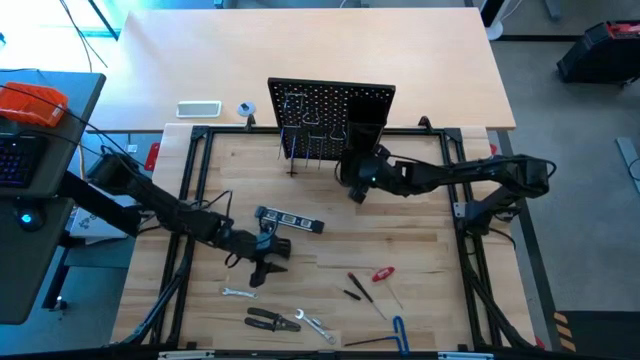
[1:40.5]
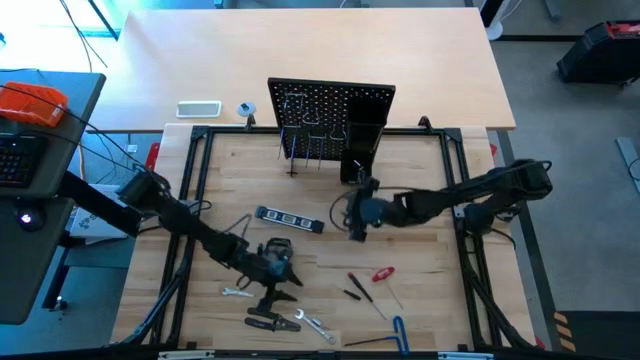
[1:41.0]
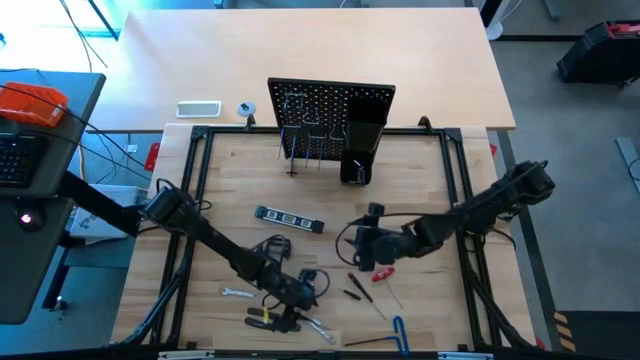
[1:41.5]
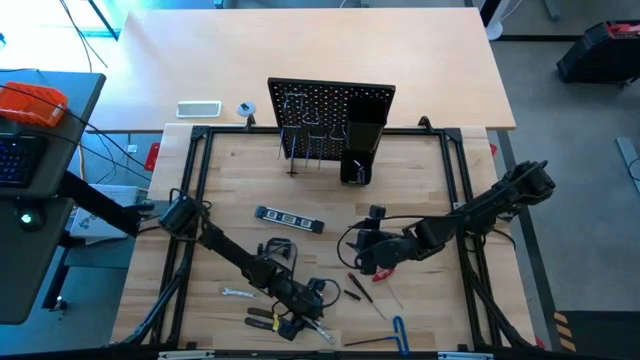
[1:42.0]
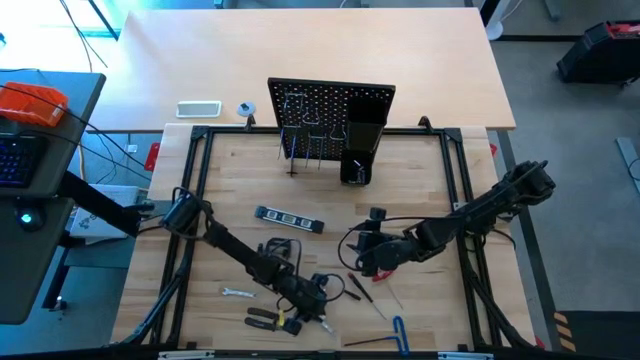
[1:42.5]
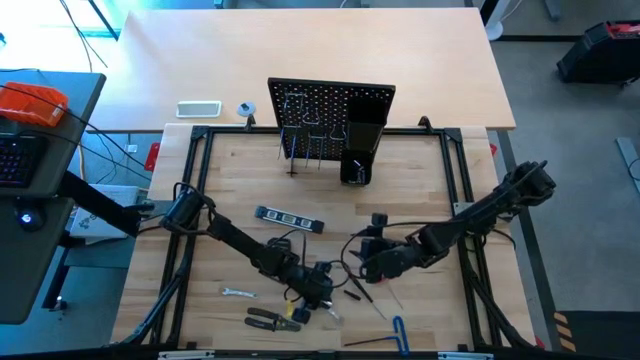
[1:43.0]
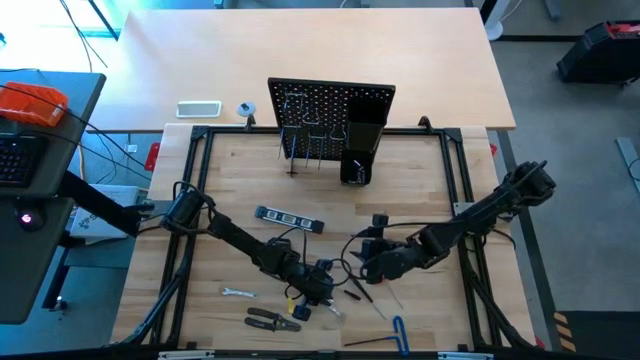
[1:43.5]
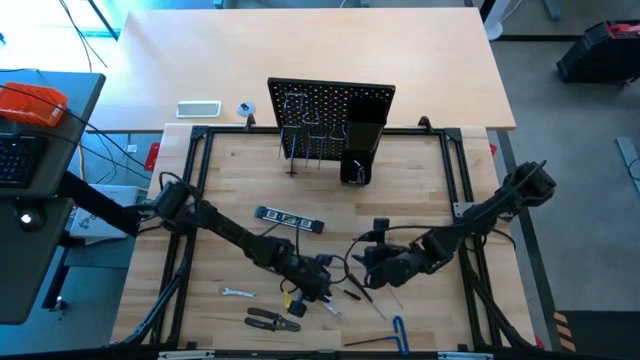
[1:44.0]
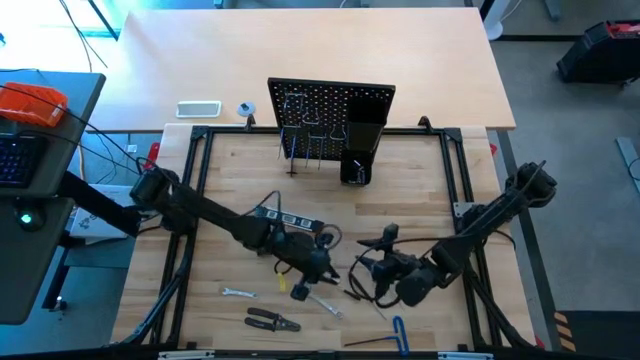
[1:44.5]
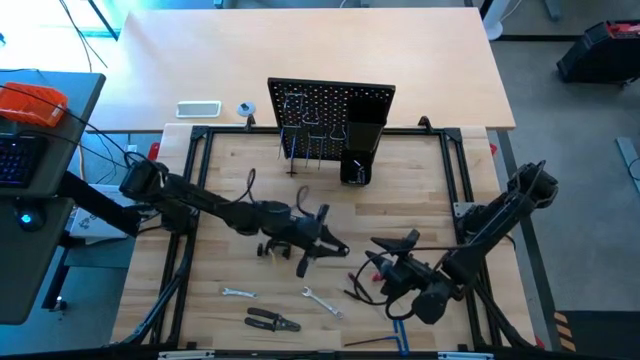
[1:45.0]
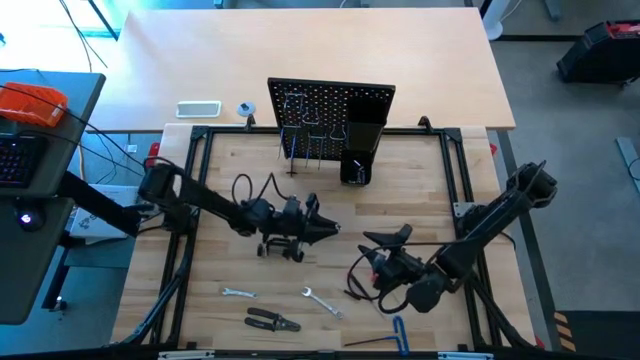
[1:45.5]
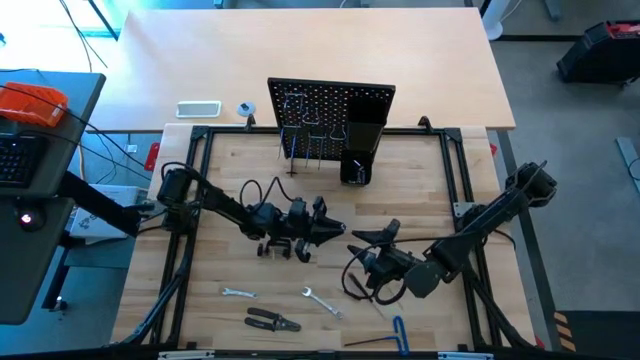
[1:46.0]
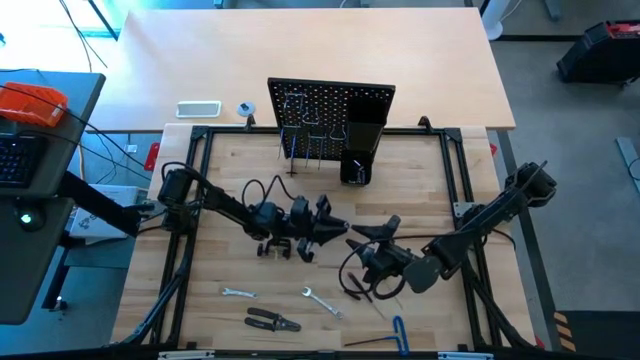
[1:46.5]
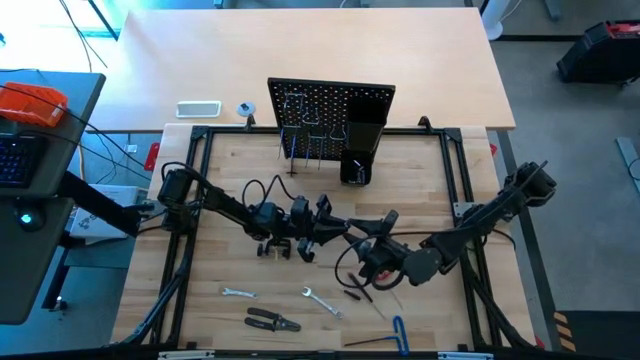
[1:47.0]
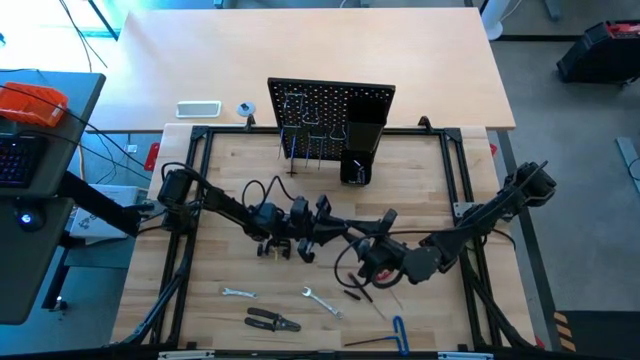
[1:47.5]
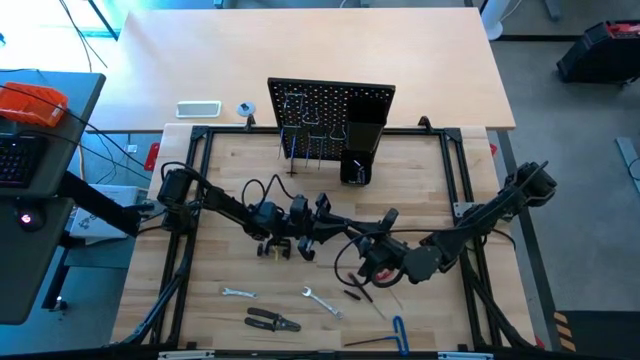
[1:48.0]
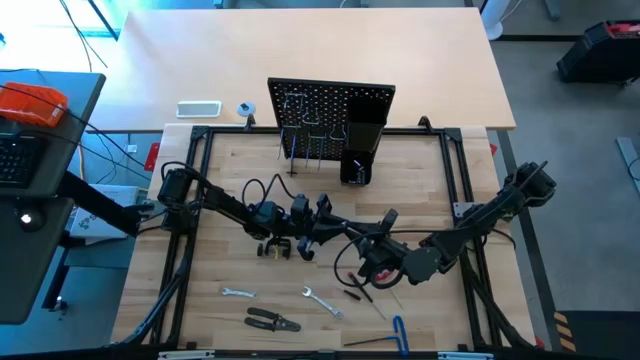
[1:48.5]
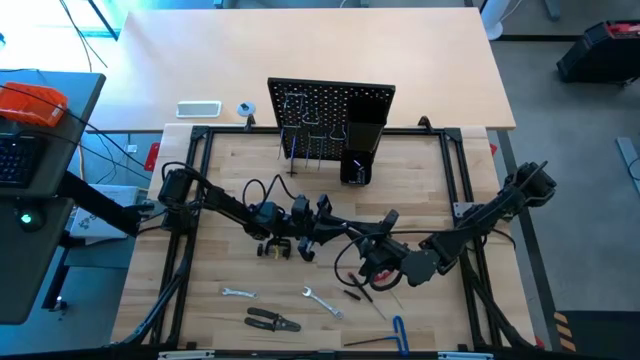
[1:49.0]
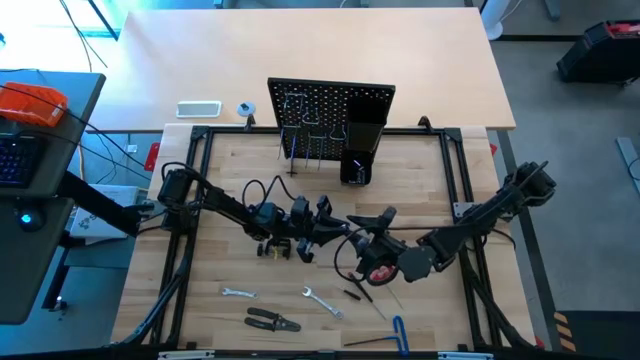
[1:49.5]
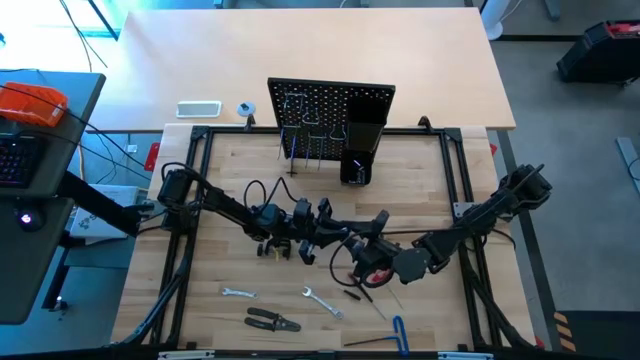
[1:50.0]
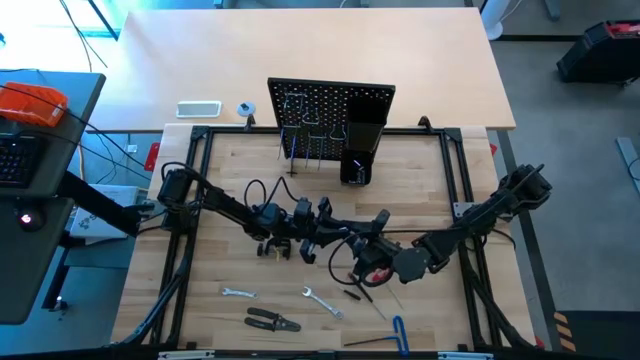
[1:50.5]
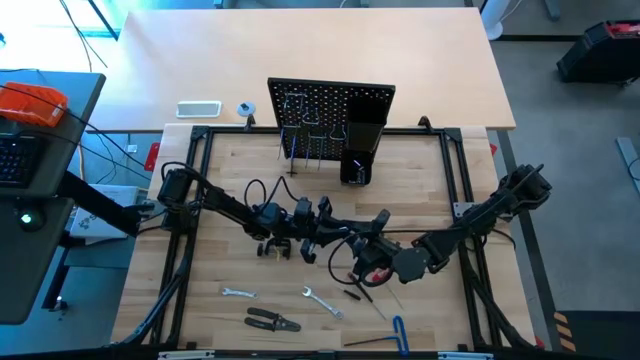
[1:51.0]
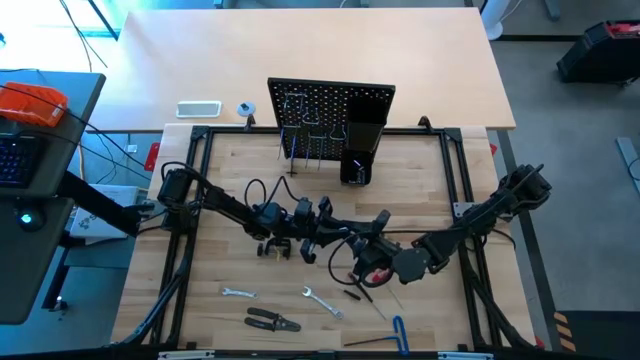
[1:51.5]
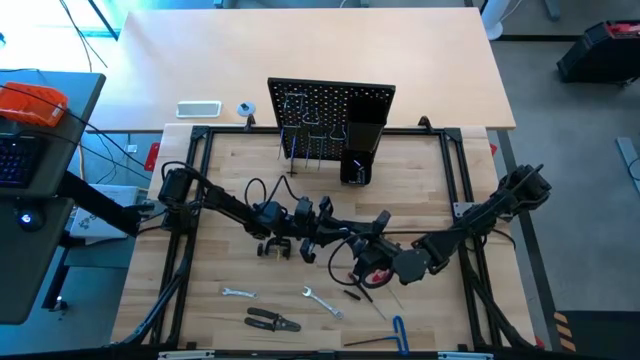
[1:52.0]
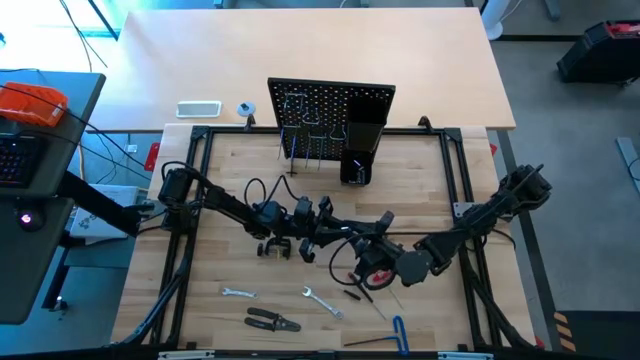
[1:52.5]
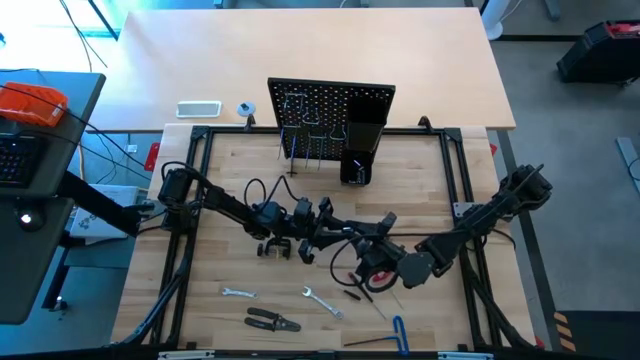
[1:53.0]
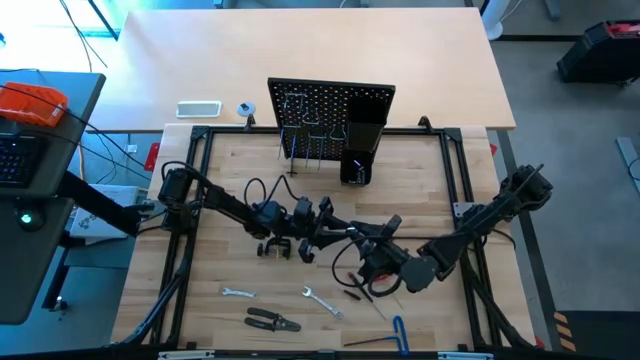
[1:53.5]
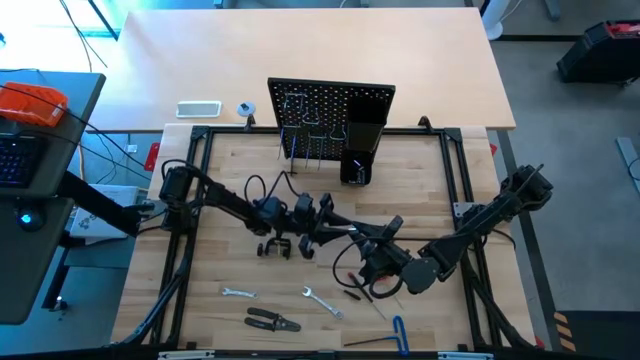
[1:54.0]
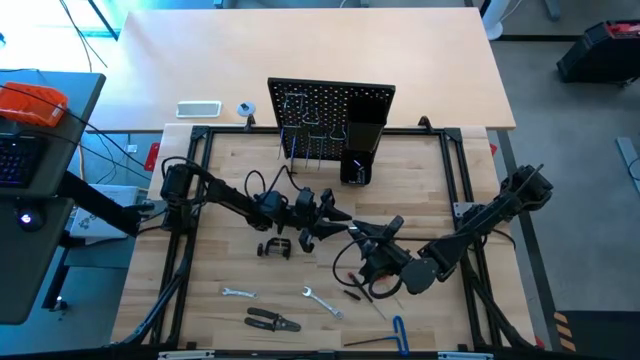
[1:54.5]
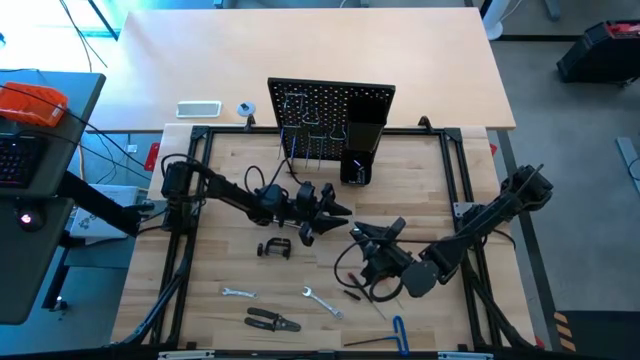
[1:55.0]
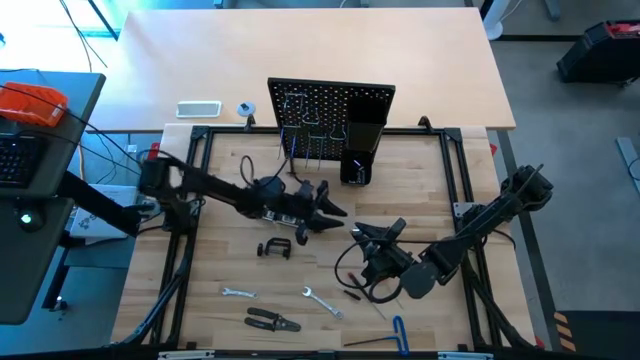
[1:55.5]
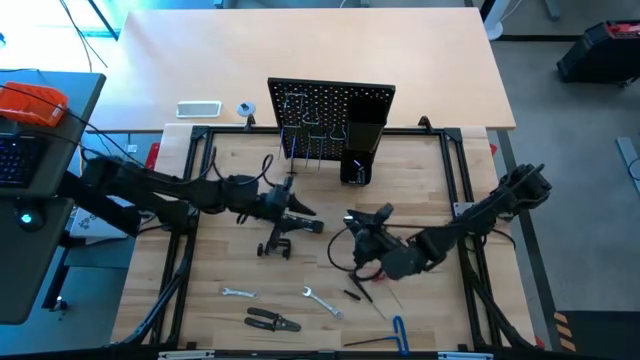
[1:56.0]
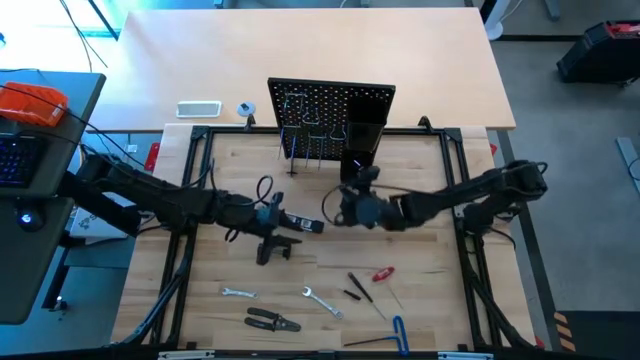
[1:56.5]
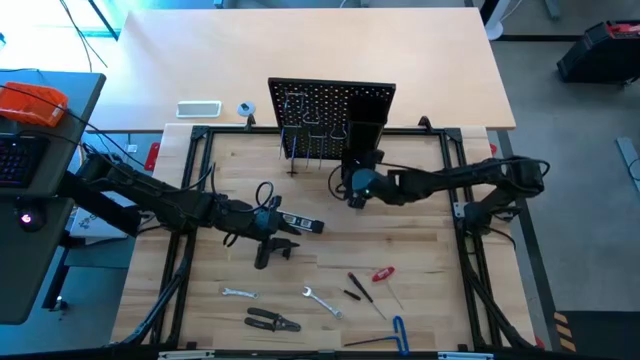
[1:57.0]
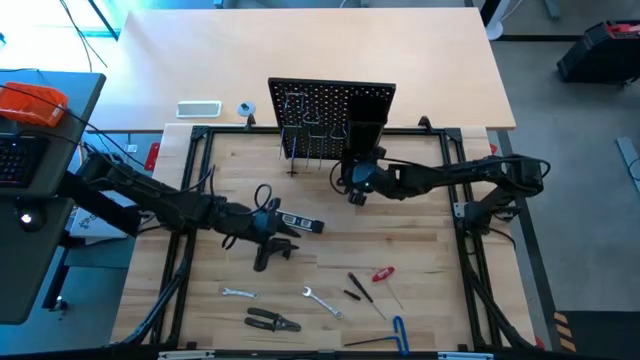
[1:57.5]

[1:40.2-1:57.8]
Task: Hang tools onto peg board
Put the socket into the bottom peg board bin

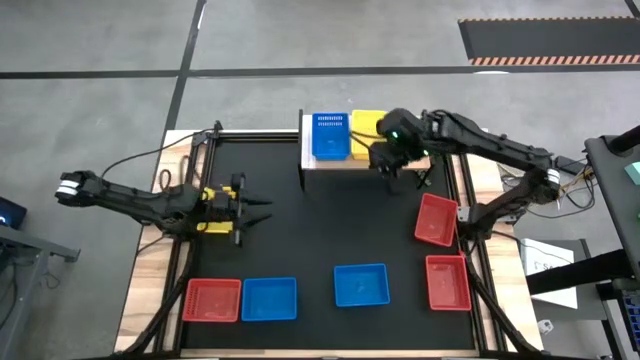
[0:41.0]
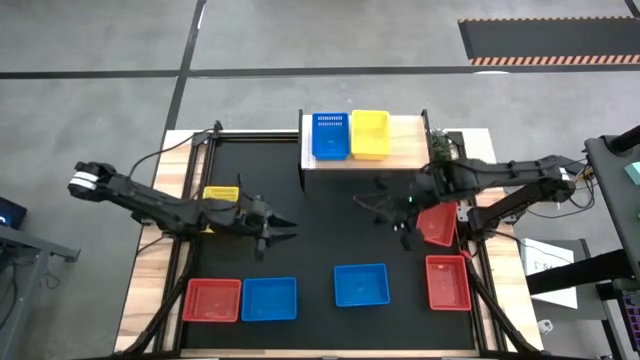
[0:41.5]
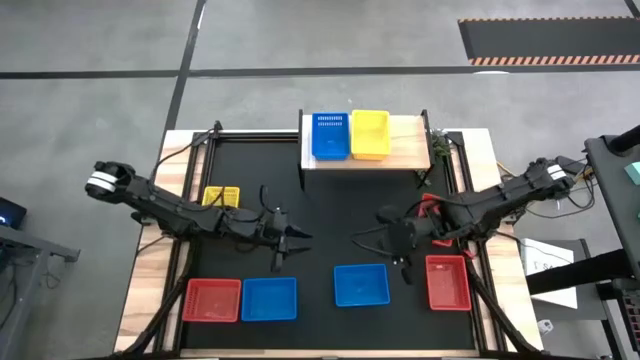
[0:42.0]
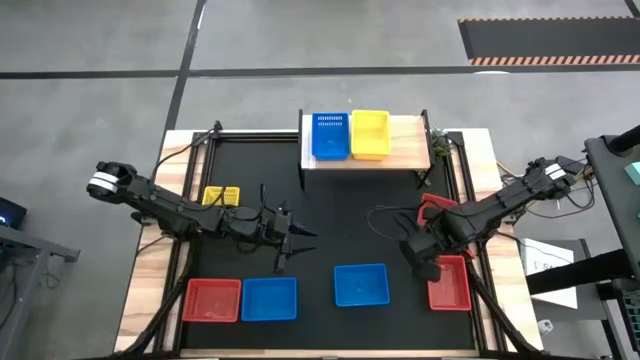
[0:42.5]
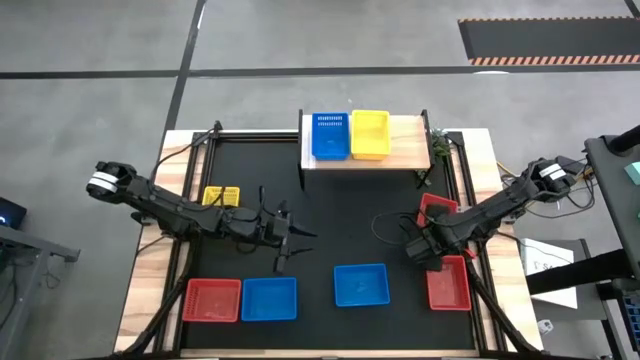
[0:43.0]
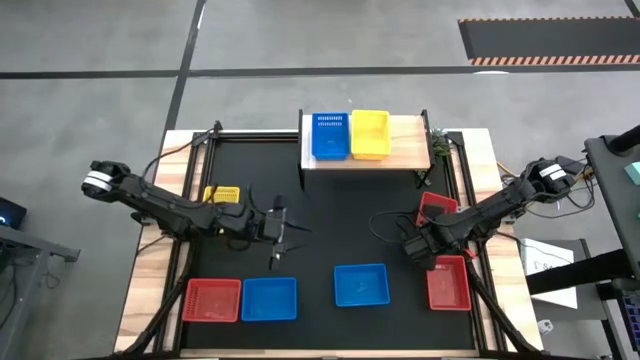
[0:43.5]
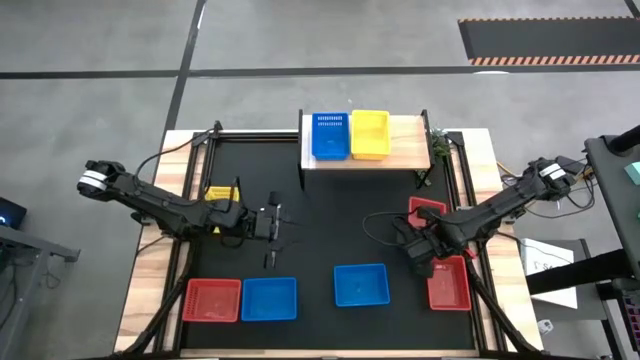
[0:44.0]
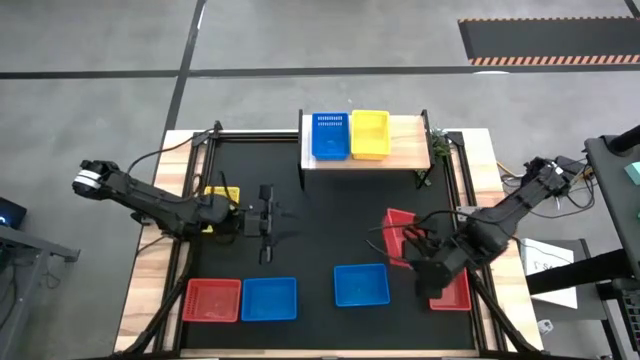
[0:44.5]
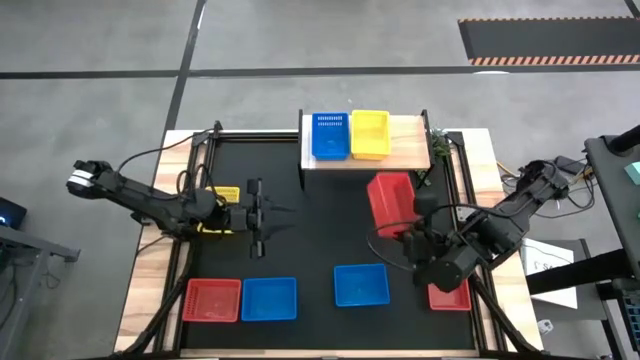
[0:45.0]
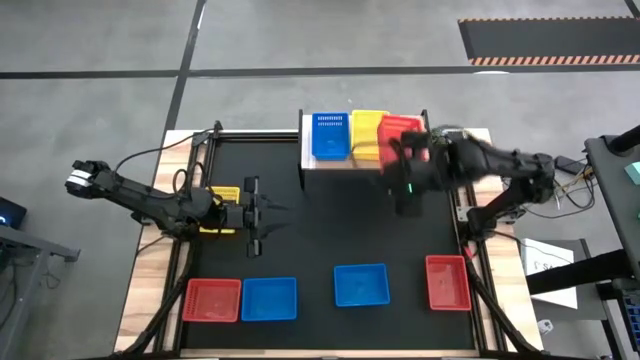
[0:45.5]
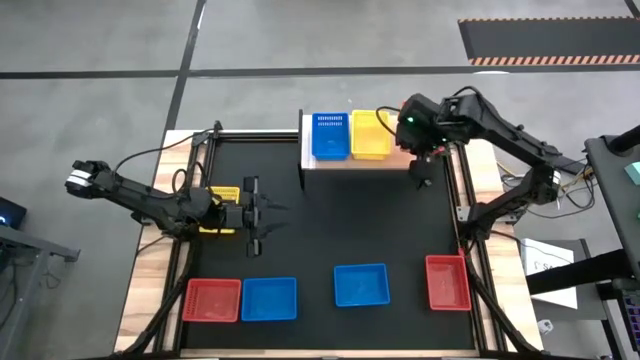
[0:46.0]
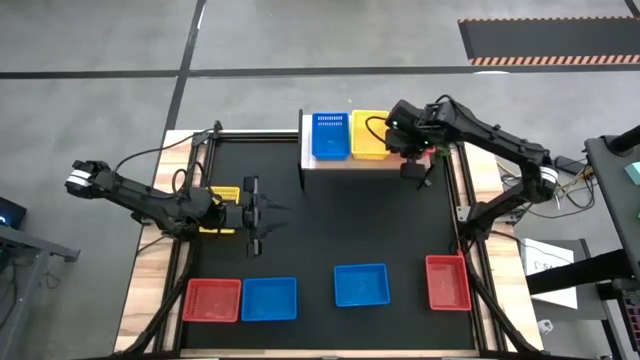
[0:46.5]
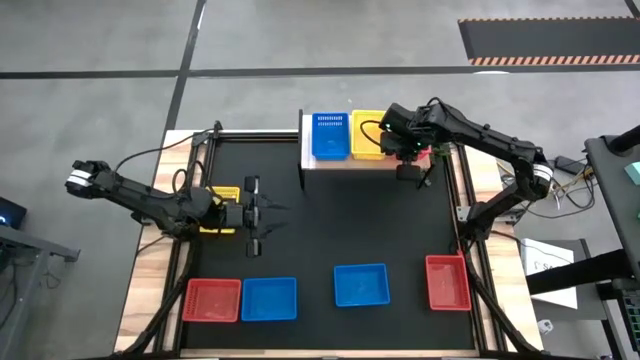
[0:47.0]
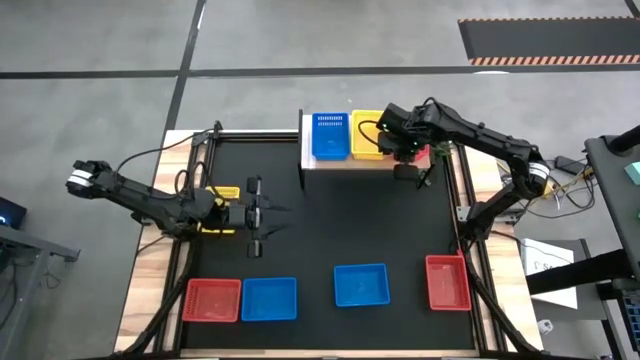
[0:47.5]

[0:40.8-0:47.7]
Task: Stack baskets on shelf by color
Put the top right red bin on the shelf
